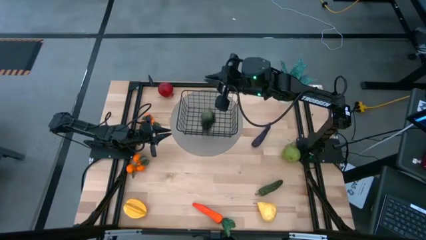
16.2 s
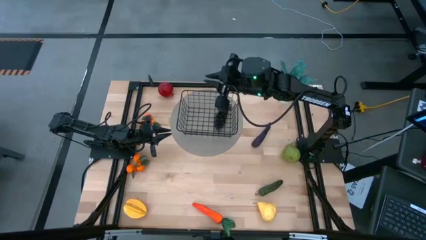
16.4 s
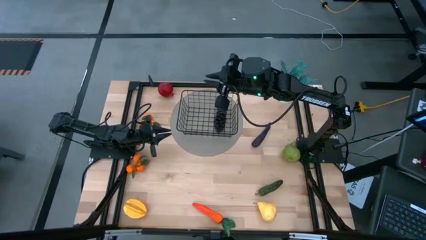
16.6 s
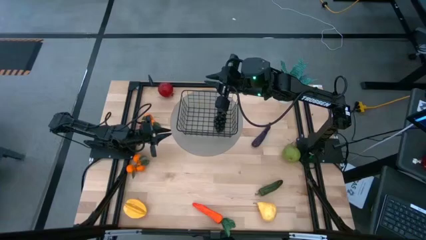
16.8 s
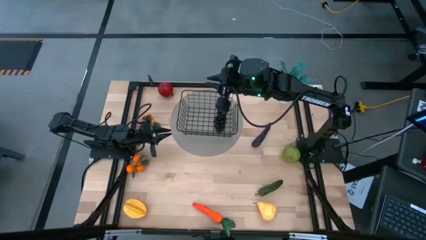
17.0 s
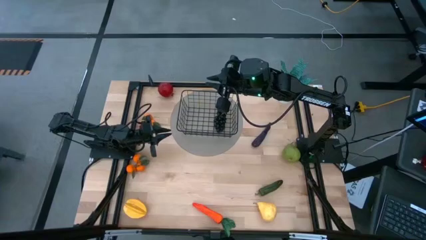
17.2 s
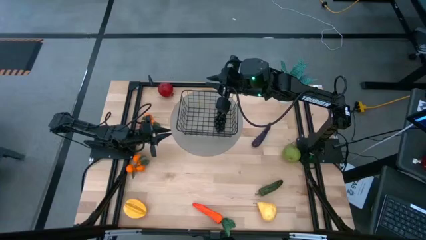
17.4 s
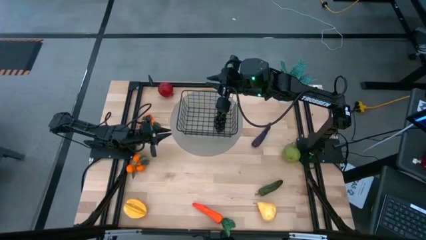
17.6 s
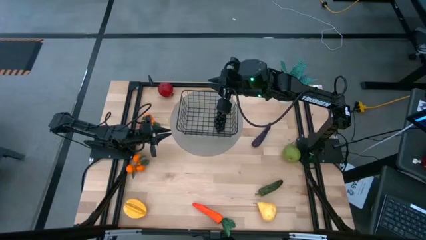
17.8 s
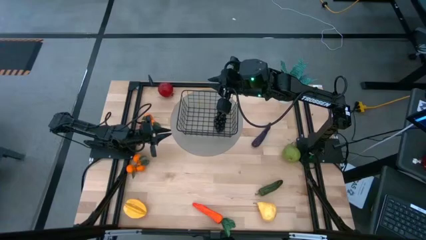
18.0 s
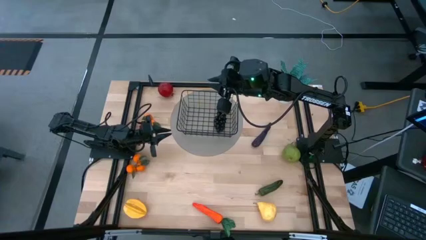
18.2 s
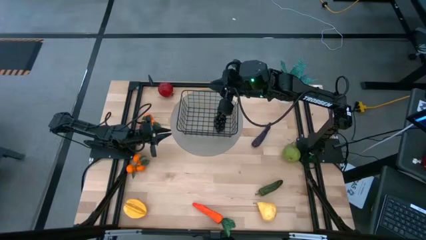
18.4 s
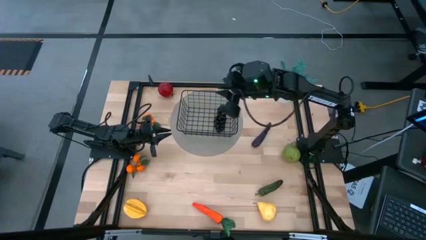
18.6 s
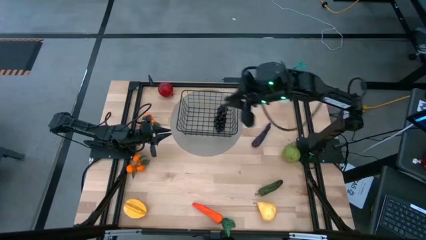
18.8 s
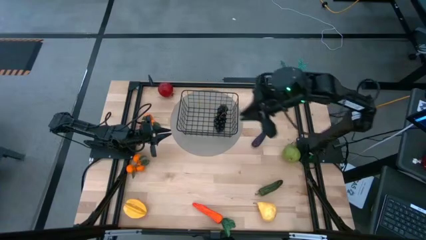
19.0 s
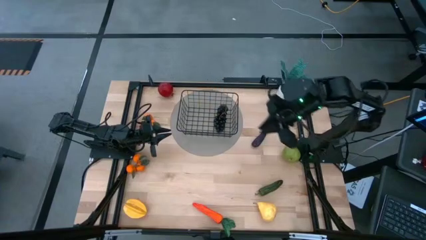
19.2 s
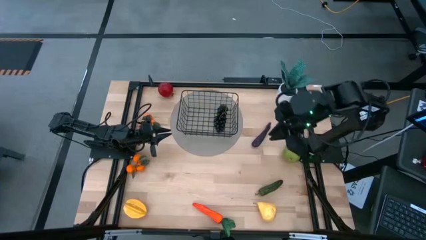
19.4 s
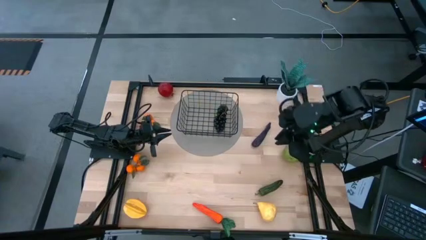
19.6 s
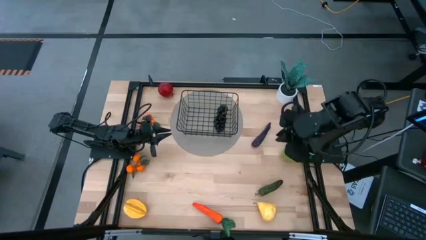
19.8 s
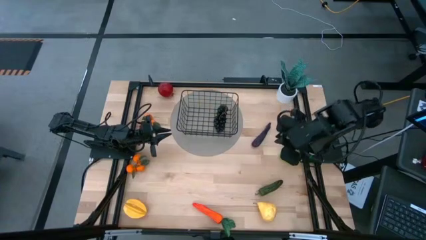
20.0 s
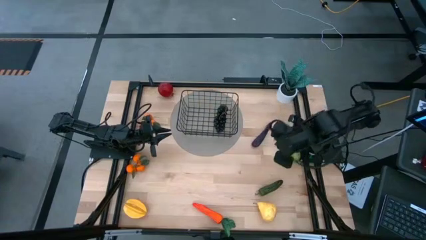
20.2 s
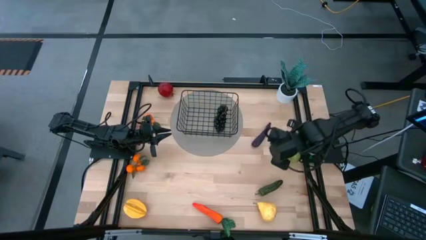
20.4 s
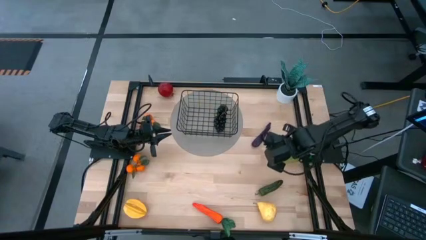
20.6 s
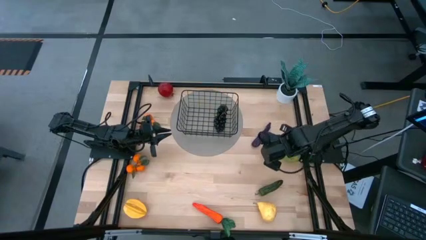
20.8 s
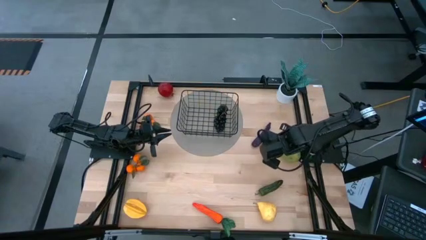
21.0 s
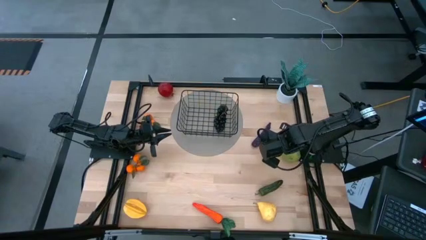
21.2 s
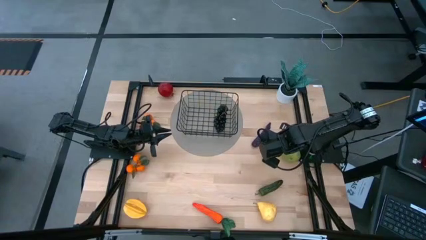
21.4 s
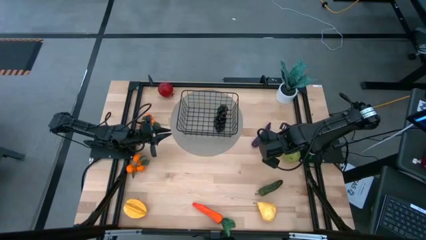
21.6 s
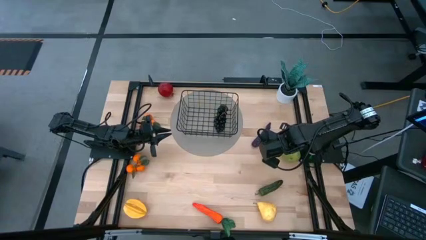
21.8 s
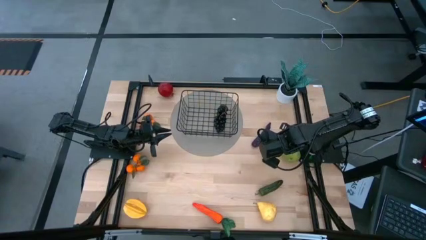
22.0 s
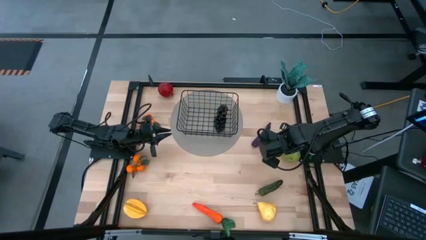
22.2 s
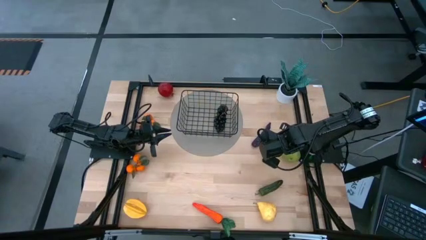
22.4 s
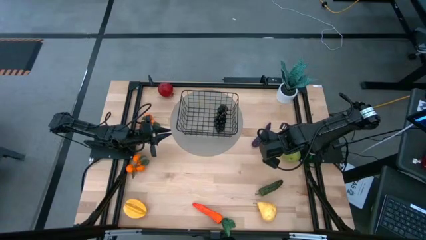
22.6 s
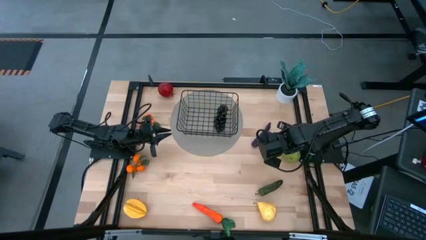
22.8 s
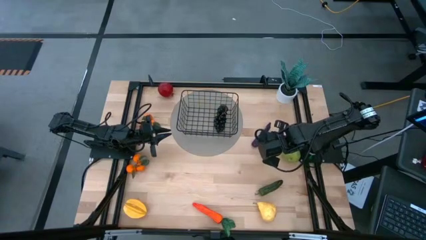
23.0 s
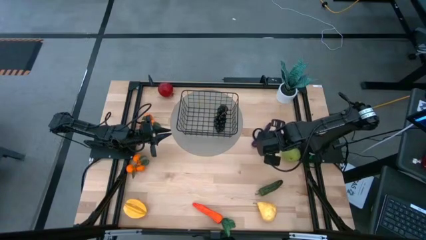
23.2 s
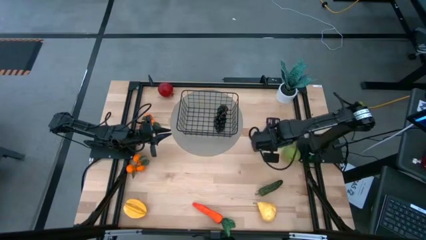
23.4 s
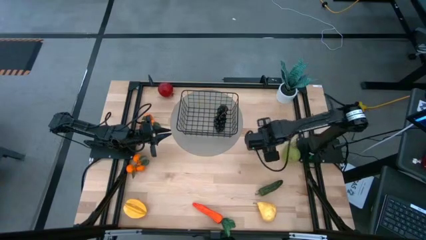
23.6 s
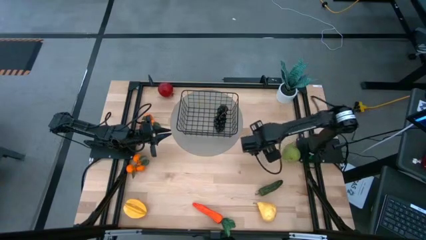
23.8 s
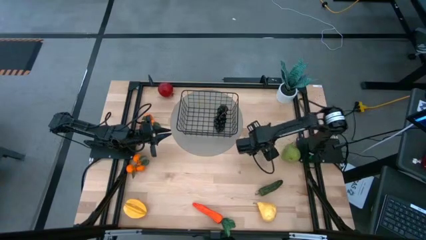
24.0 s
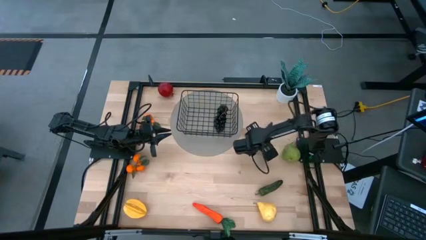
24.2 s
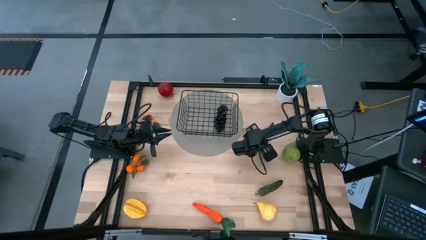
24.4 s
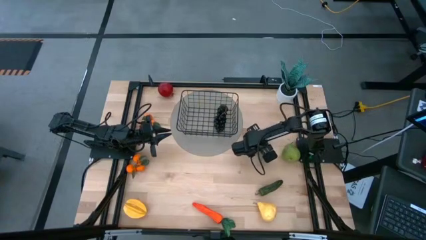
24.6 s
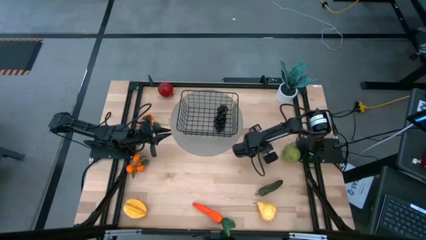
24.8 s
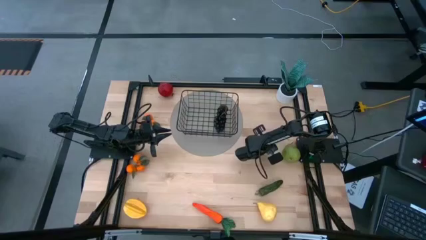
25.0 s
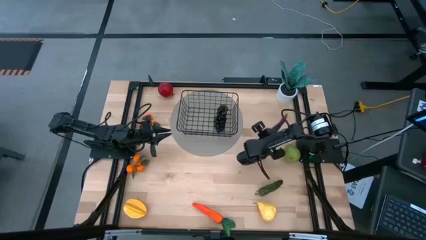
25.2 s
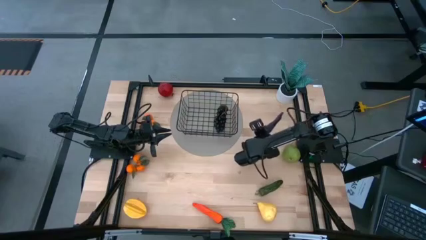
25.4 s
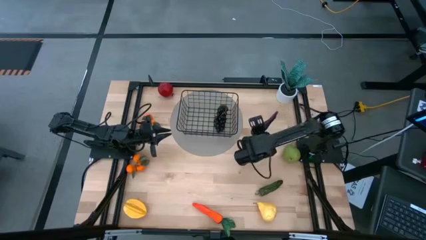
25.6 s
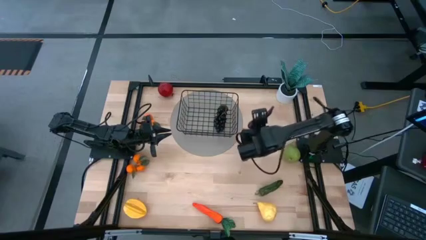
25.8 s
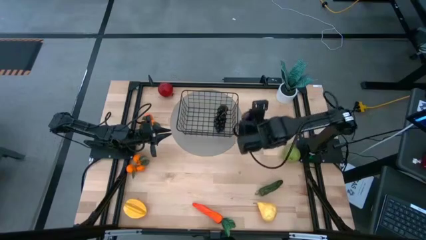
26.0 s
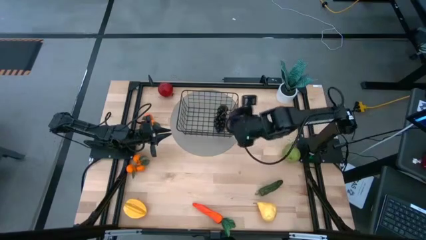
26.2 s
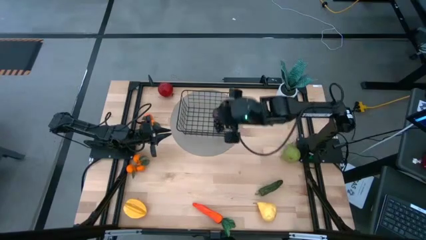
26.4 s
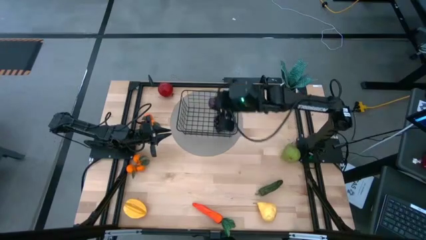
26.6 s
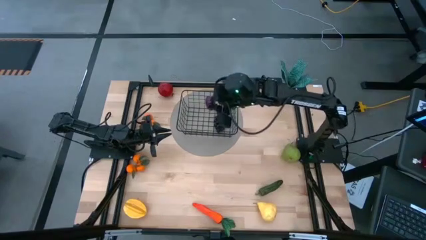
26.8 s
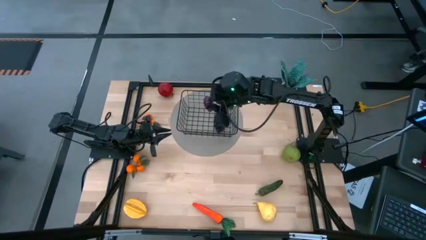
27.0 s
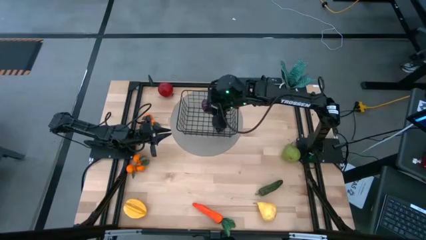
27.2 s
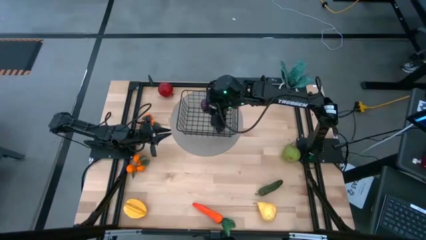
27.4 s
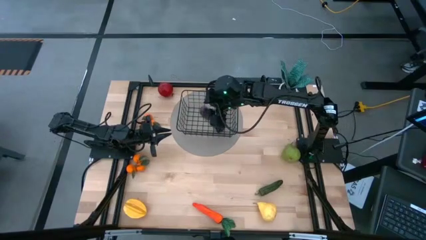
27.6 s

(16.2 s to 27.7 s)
Task: Build produce basket
Put the purple eggplant into the black wire basket

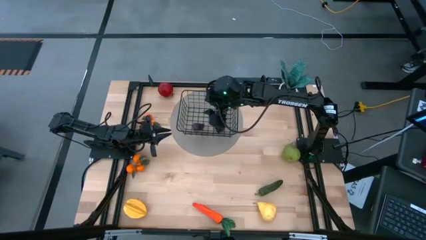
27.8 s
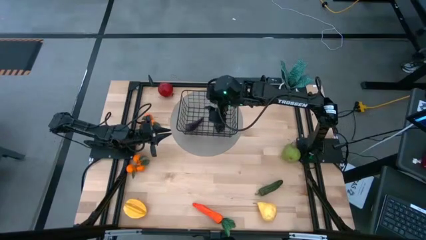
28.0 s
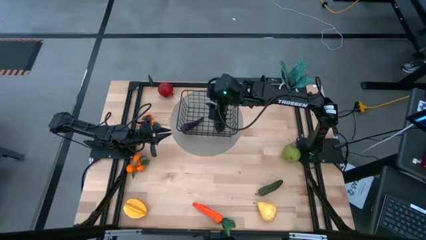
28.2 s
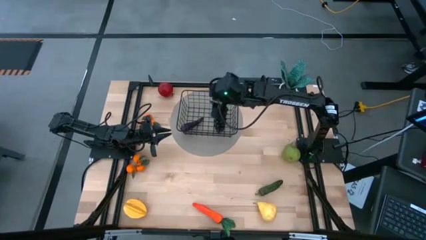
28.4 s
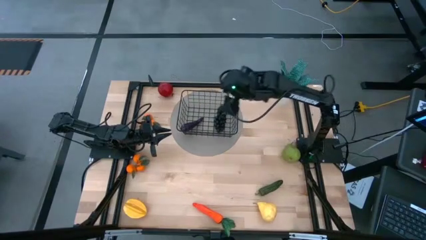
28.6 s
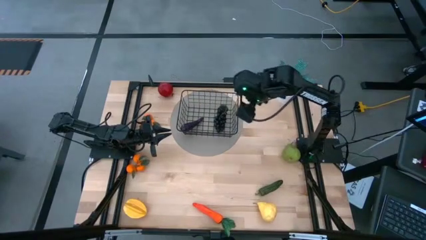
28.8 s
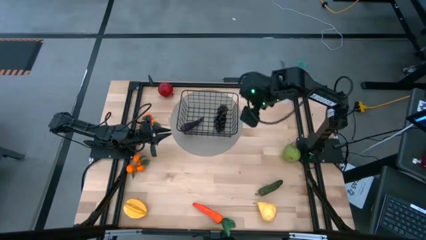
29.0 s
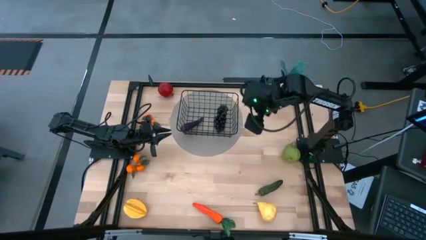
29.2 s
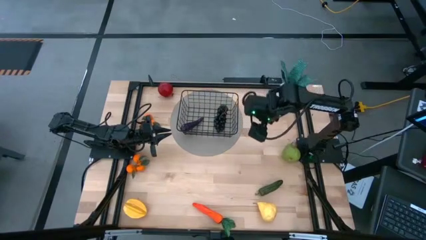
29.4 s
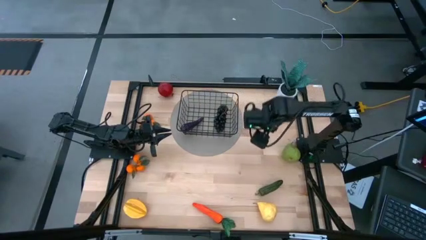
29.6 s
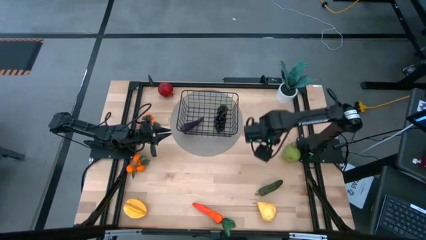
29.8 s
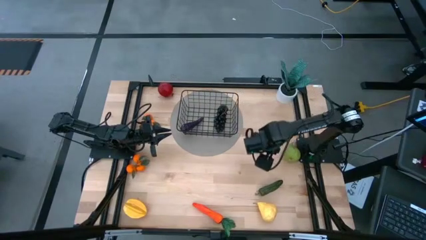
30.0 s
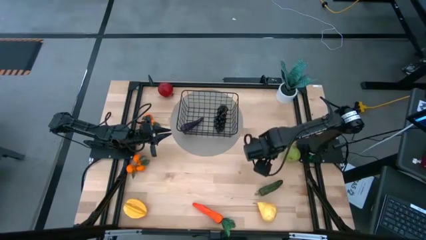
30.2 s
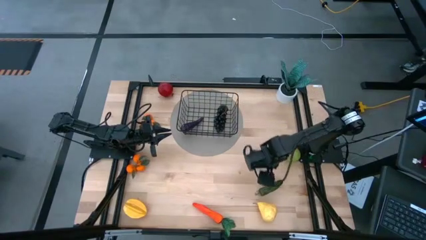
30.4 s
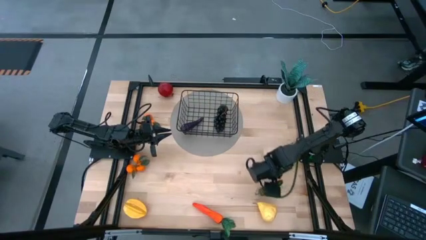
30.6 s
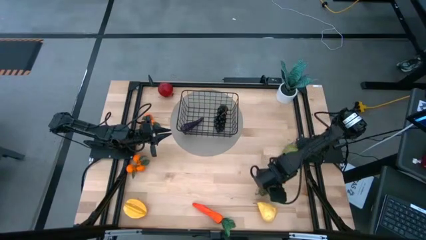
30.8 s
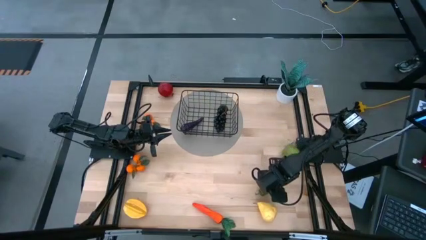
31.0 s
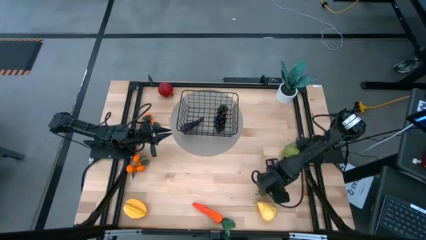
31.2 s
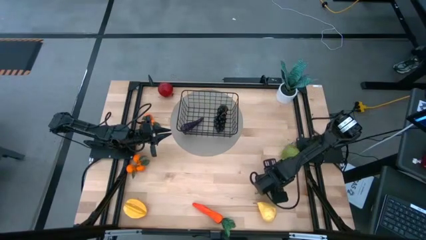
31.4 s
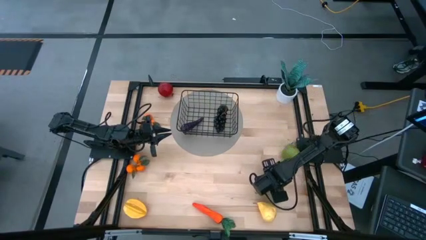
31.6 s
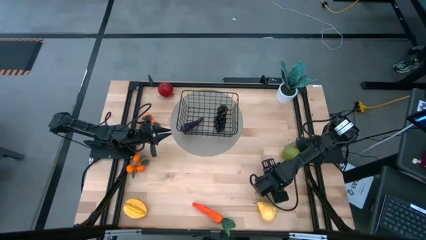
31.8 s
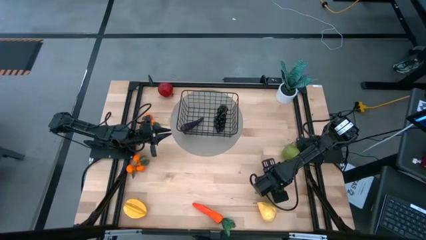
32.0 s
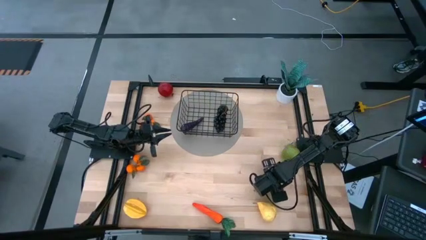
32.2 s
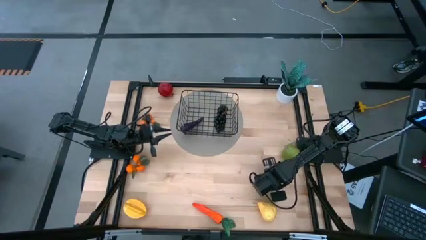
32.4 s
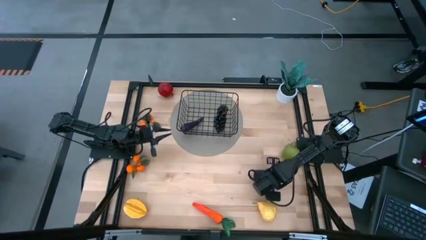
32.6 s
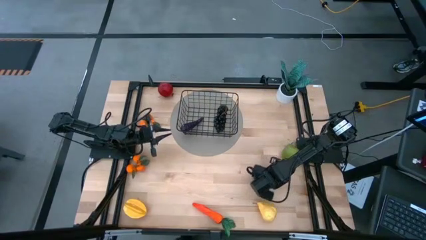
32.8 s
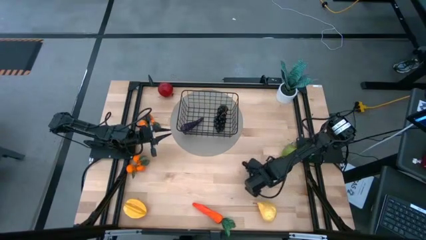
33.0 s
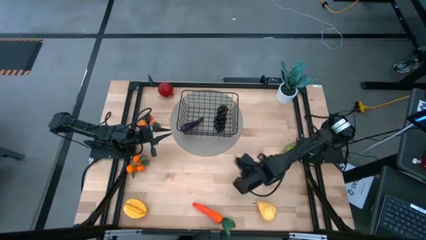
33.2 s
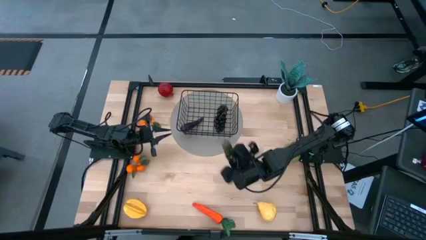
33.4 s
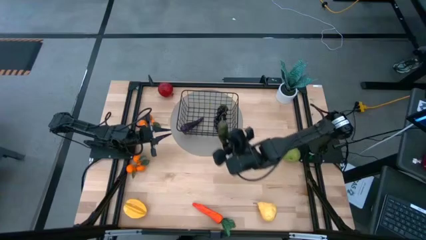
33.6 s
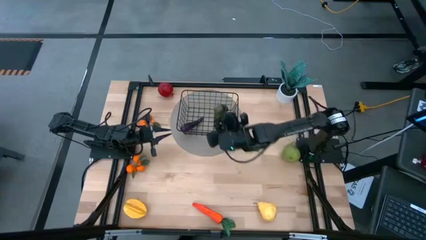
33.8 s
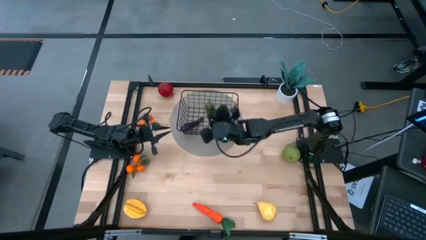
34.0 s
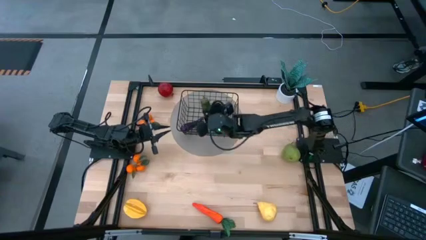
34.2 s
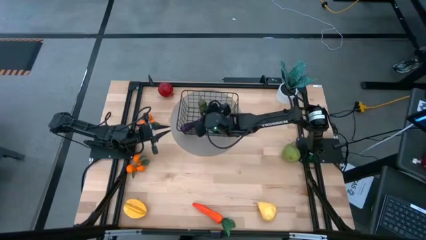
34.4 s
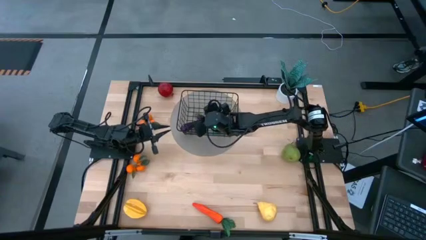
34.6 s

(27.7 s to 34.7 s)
Put the green chili pepper into the black wire basket
